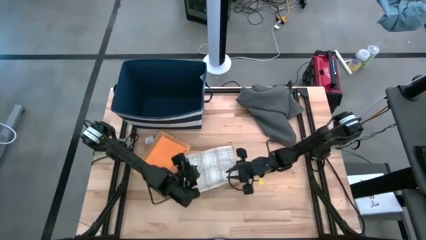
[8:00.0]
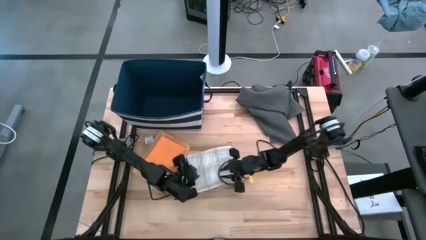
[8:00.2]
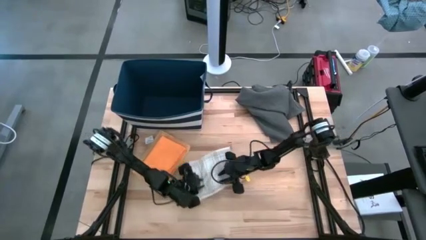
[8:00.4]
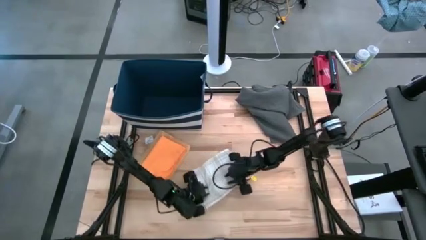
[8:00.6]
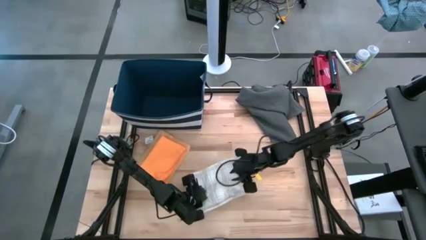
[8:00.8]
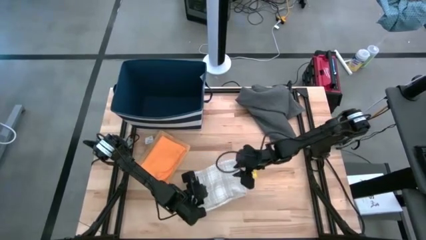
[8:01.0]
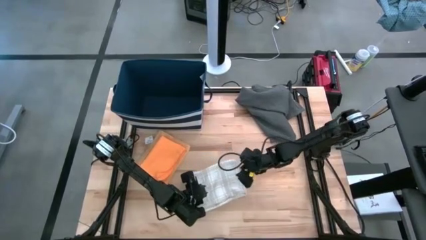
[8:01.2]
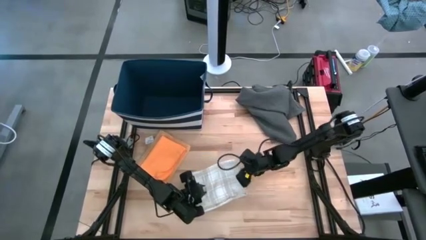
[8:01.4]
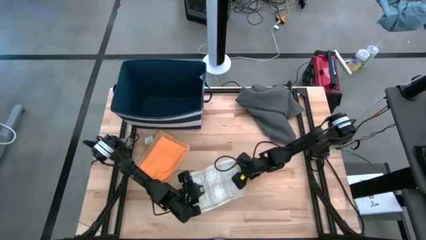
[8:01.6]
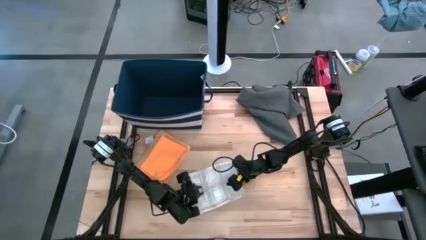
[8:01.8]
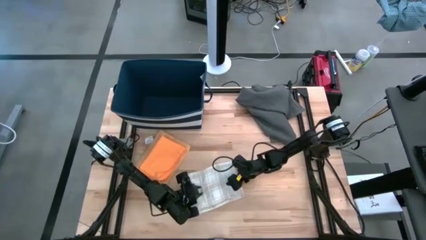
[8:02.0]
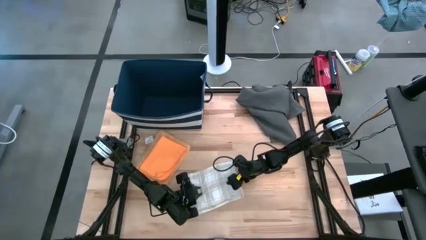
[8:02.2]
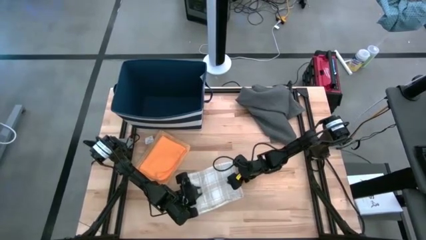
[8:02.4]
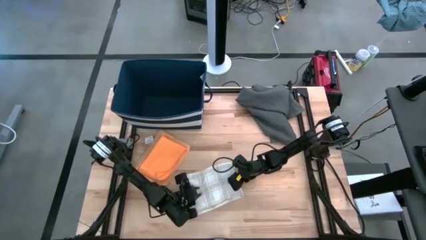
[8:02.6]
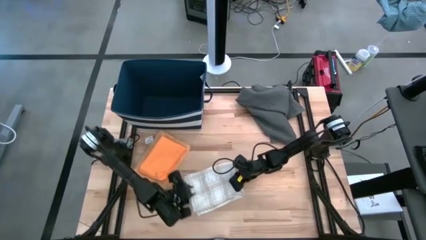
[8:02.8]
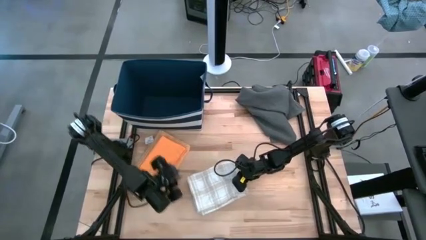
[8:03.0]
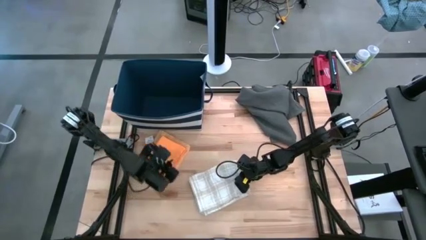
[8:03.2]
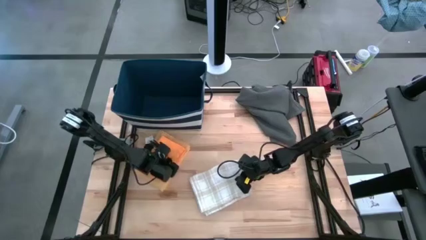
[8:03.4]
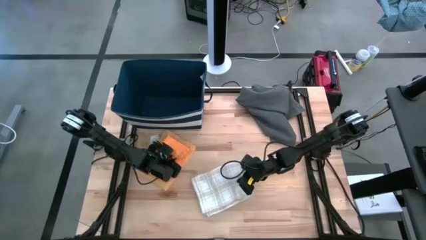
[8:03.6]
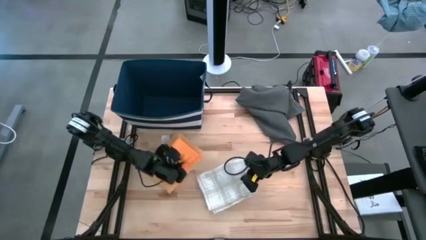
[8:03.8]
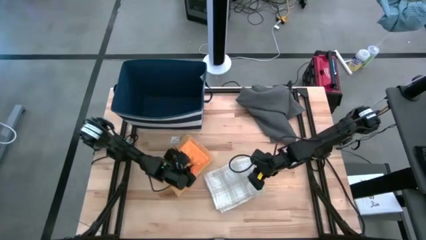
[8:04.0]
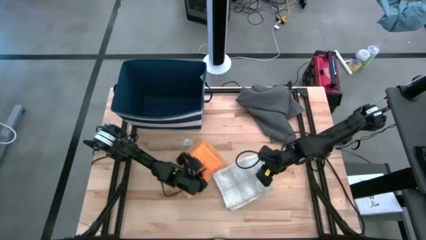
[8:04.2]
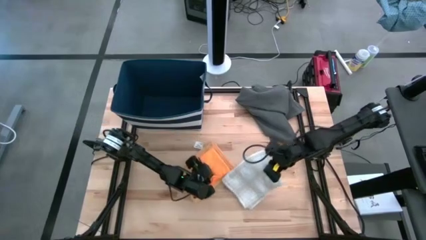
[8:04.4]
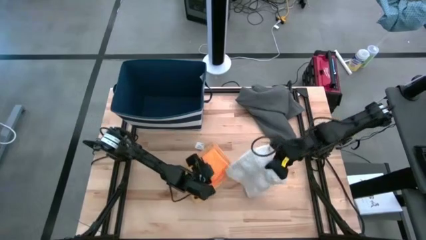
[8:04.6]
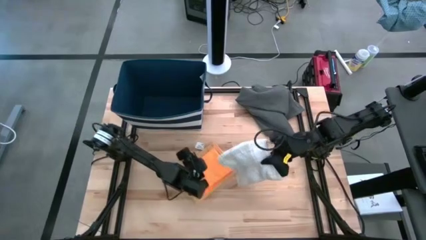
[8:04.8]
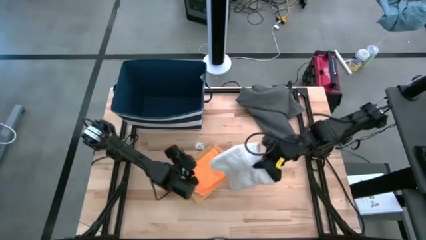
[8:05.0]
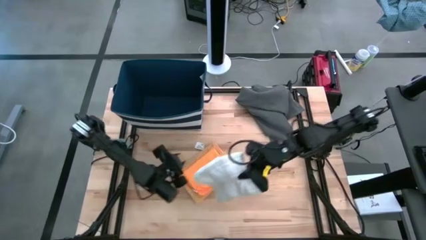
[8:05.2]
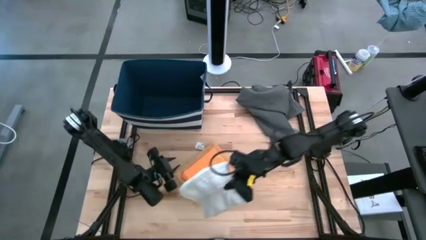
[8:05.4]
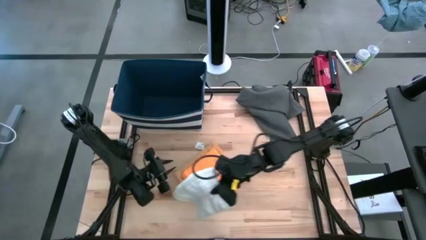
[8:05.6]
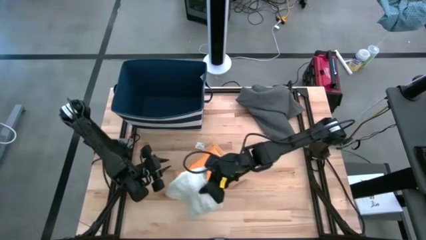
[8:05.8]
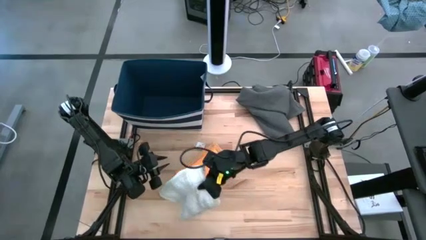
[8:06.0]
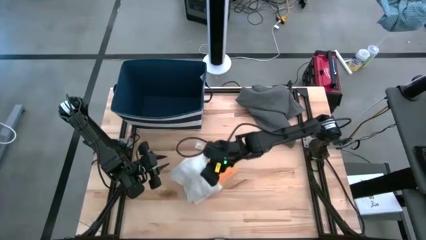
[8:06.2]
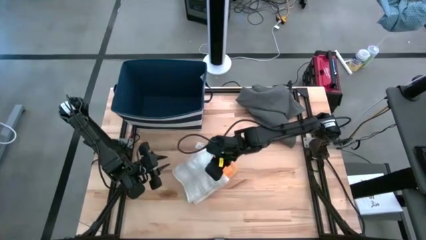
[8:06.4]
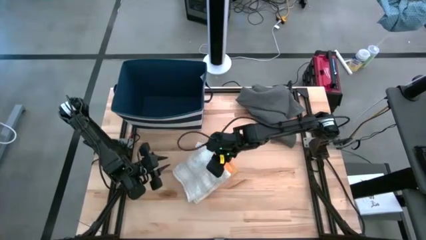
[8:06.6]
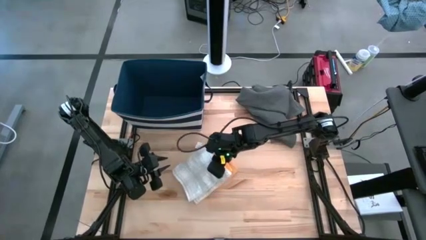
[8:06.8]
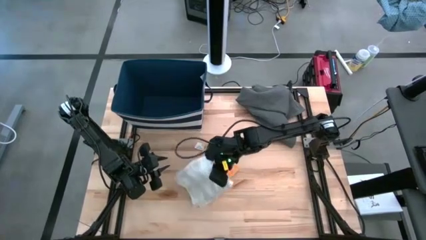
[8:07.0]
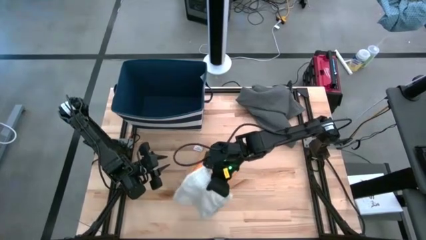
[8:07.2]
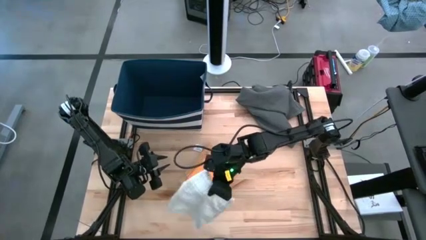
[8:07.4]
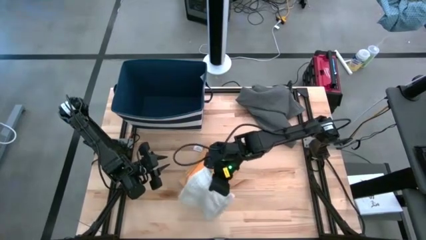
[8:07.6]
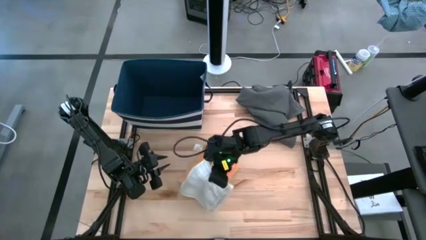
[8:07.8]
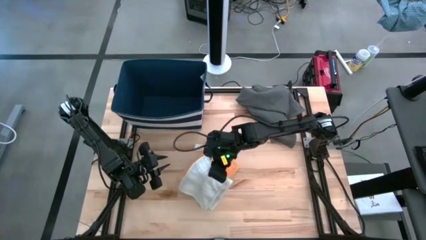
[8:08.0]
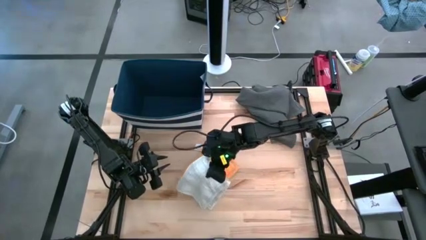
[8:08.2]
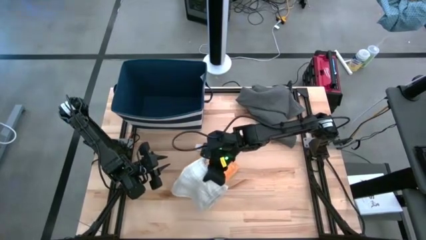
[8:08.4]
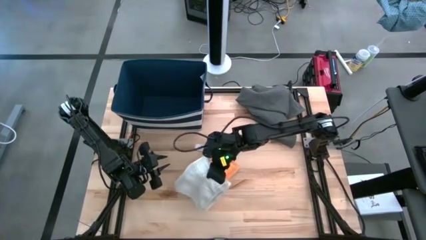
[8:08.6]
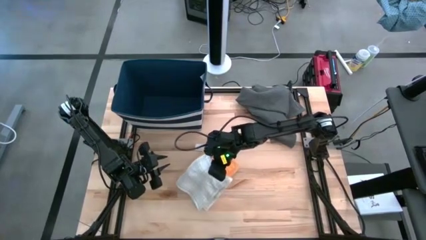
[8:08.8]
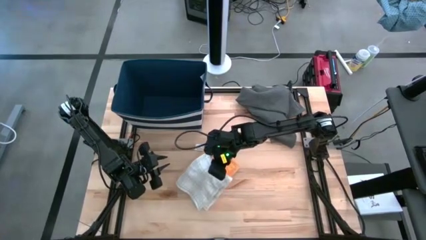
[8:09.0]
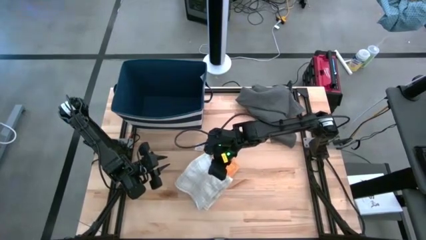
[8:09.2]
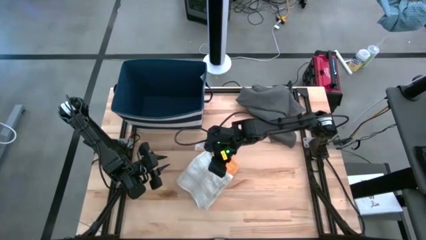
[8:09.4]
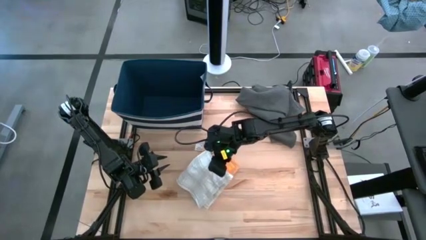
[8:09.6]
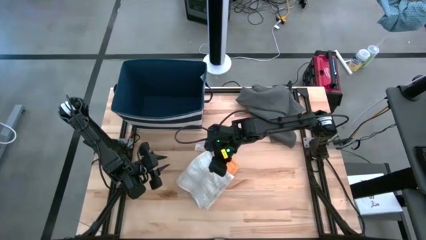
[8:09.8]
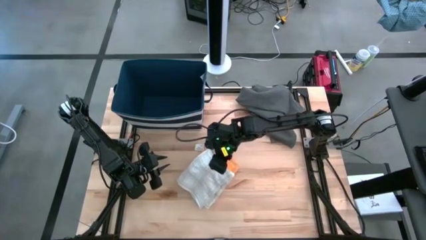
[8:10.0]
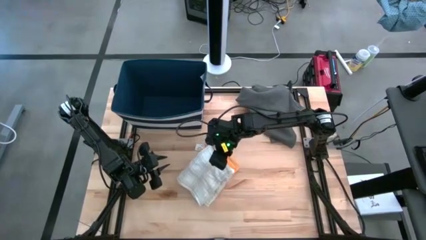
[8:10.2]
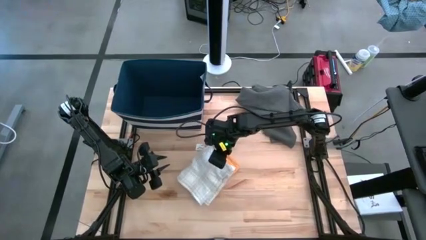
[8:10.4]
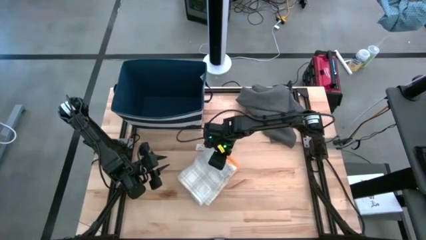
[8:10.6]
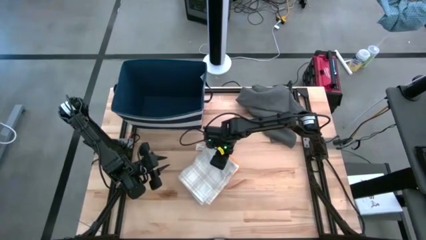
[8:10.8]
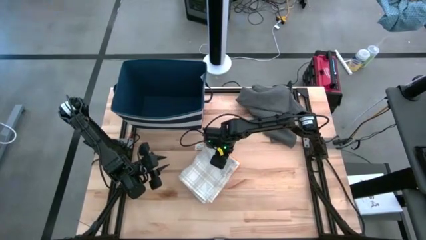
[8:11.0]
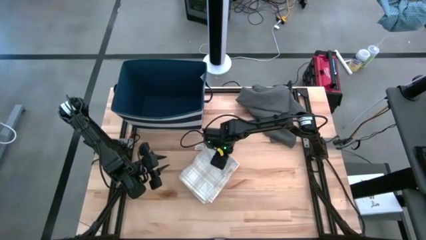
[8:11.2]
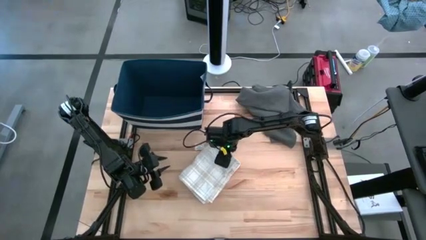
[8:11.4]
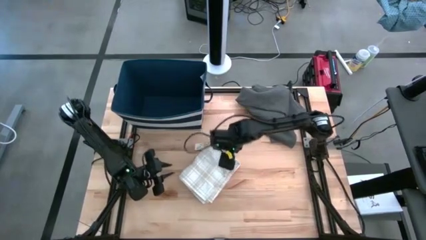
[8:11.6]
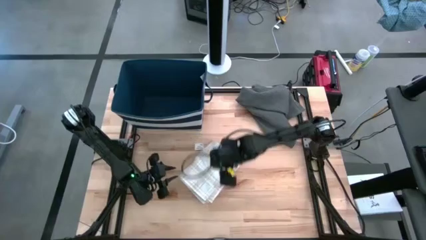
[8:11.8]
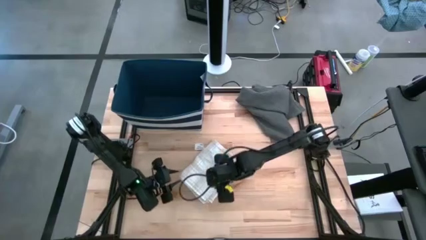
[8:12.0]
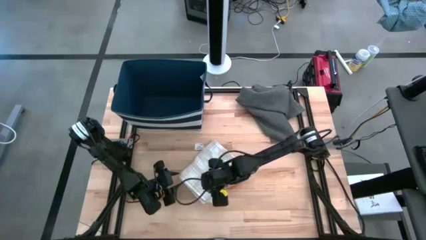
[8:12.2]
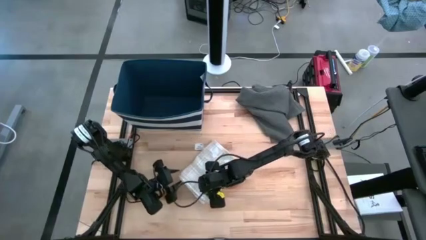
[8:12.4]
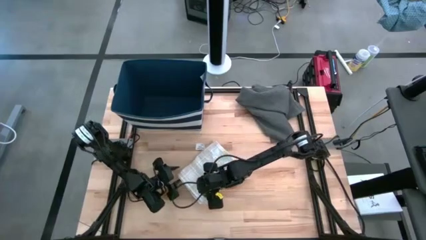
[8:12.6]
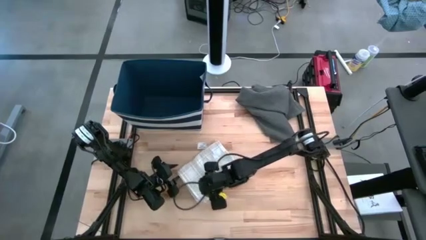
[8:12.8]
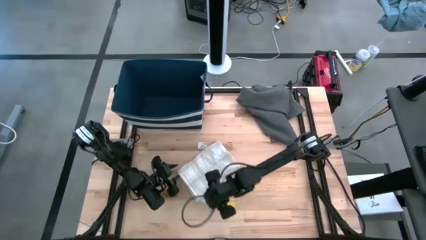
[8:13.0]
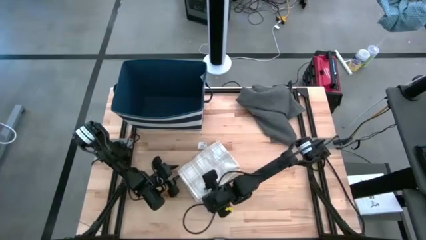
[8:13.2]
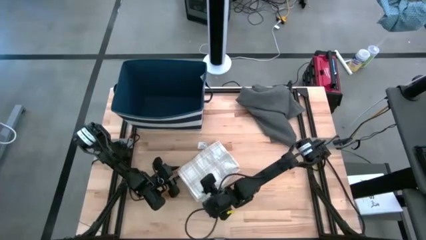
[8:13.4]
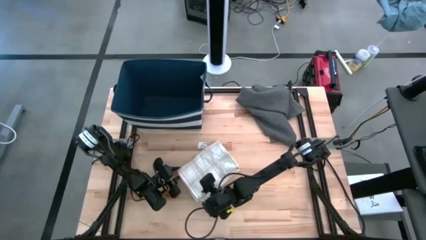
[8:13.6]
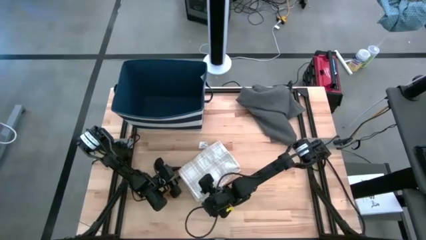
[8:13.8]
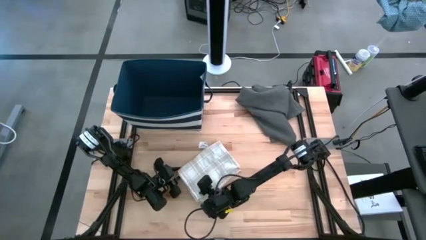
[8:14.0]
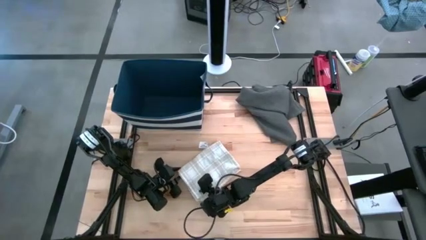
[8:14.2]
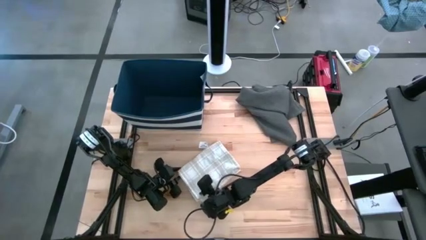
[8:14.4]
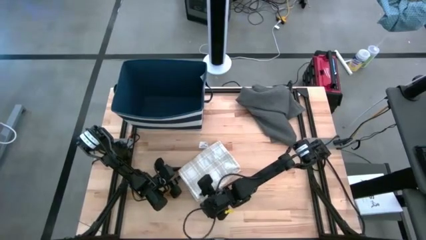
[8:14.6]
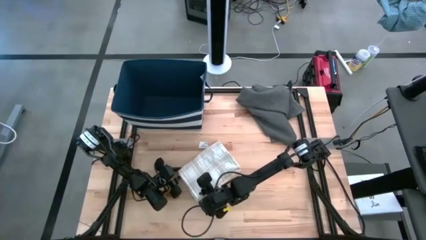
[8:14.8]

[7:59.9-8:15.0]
Task: Fold towel
Stack the white patterned kitchen towel on top of the orange towel

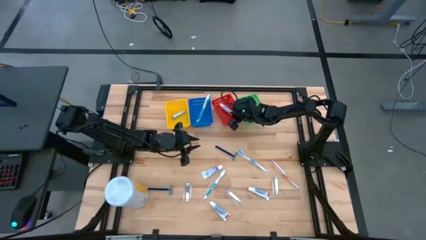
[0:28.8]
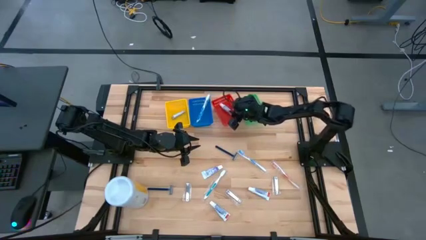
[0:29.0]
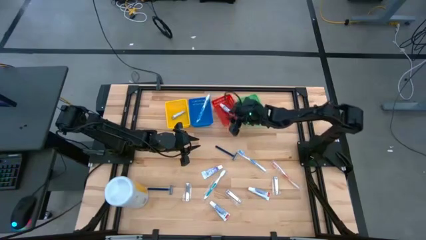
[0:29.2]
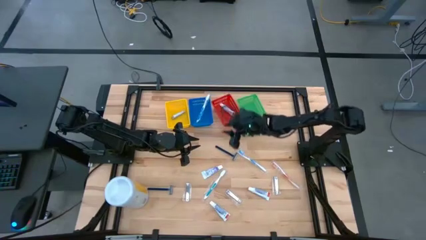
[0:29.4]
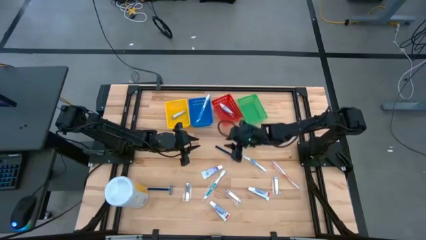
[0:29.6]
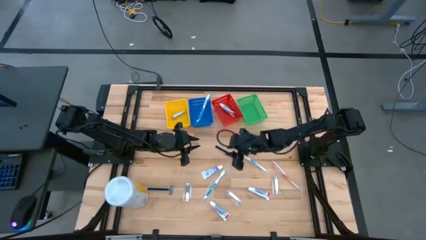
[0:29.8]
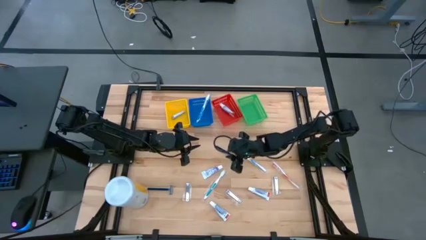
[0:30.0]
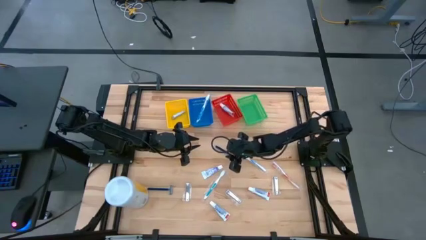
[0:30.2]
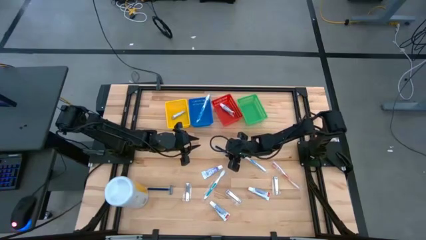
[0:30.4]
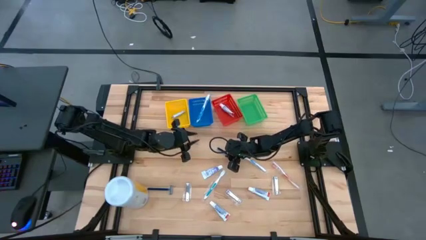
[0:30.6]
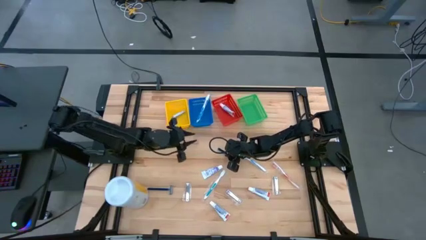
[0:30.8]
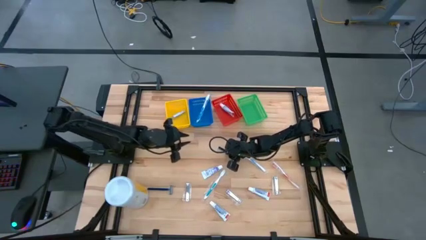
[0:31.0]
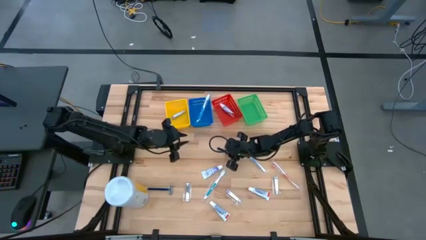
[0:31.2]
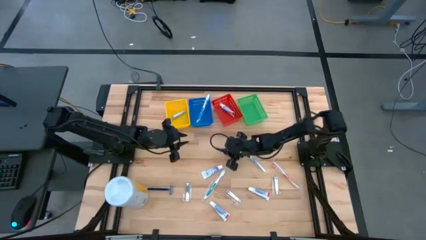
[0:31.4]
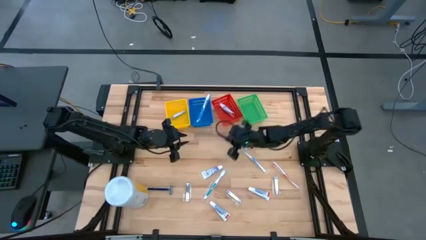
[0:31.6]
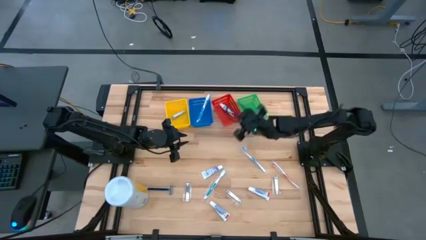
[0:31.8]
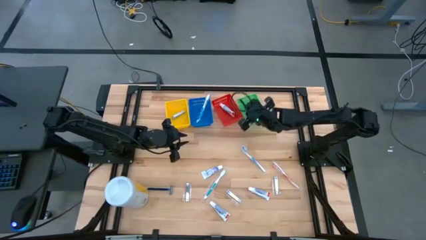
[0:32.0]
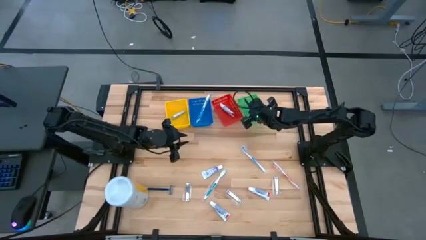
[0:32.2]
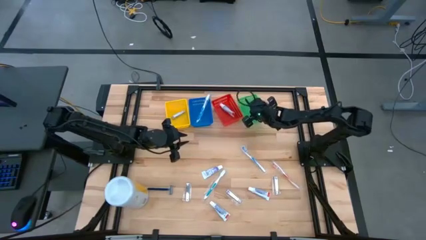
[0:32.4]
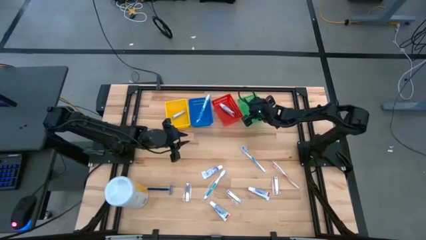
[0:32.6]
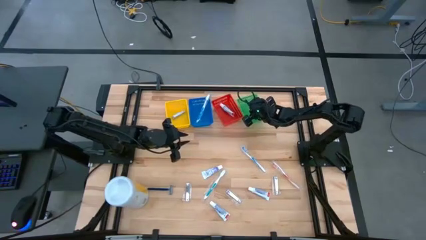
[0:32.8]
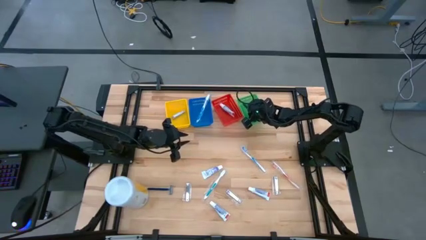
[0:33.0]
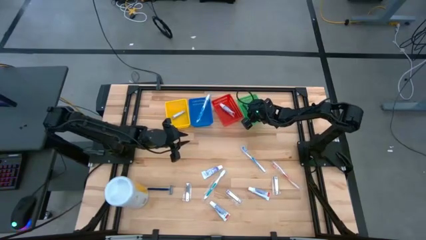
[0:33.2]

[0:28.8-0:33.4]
Task: Pick & Place Travel size toiletries
Put the top right razor blade into the green bin
